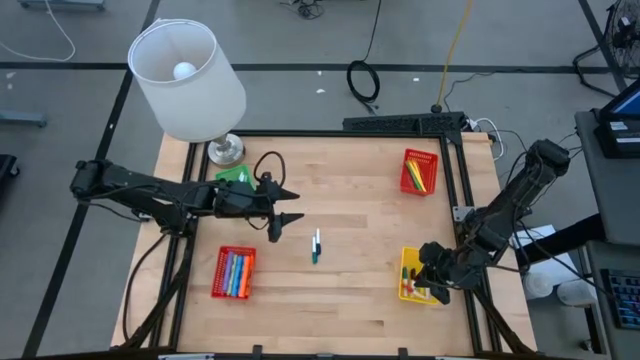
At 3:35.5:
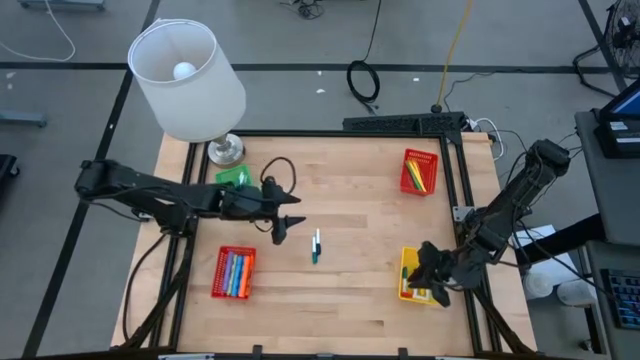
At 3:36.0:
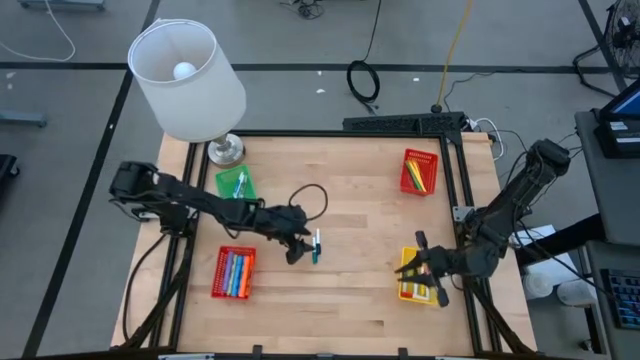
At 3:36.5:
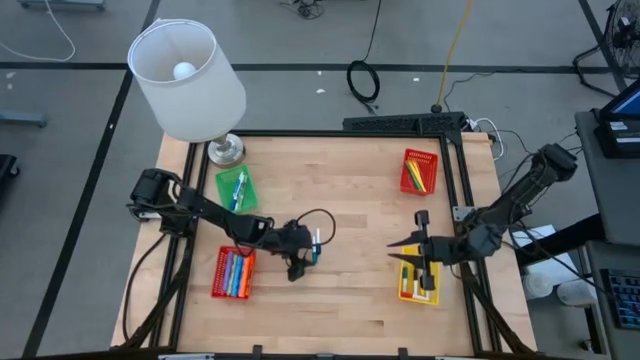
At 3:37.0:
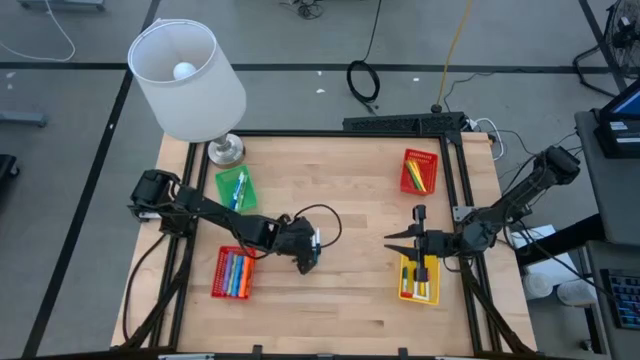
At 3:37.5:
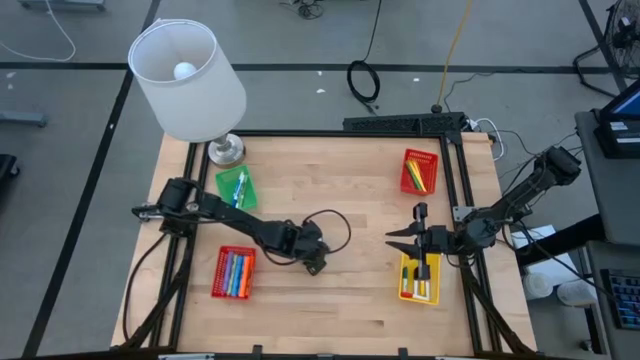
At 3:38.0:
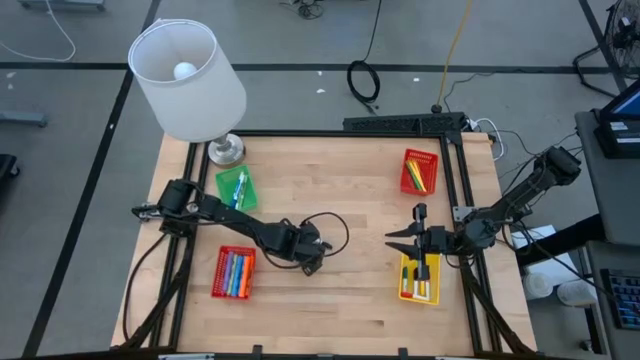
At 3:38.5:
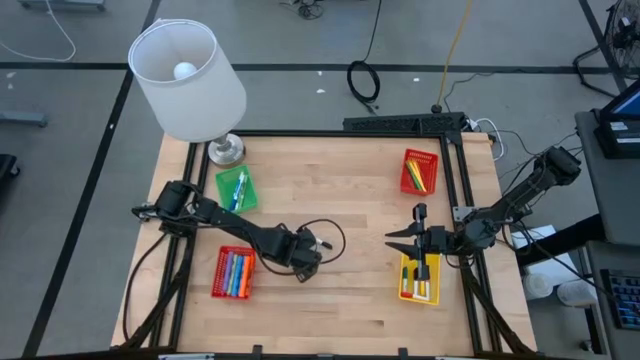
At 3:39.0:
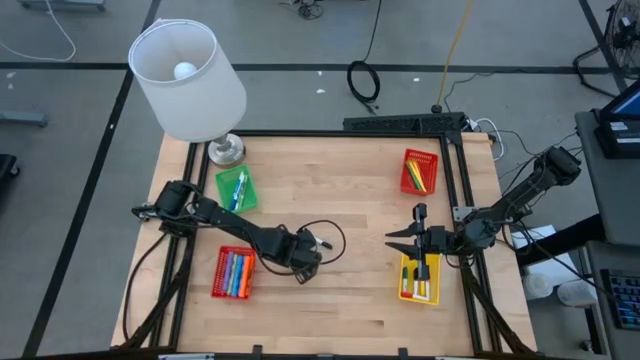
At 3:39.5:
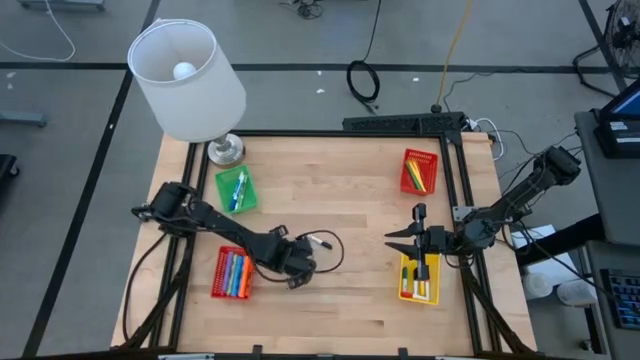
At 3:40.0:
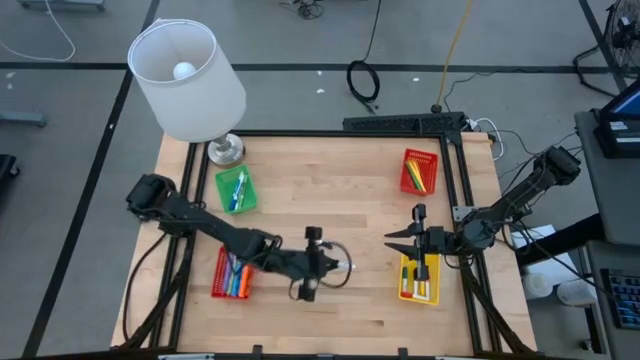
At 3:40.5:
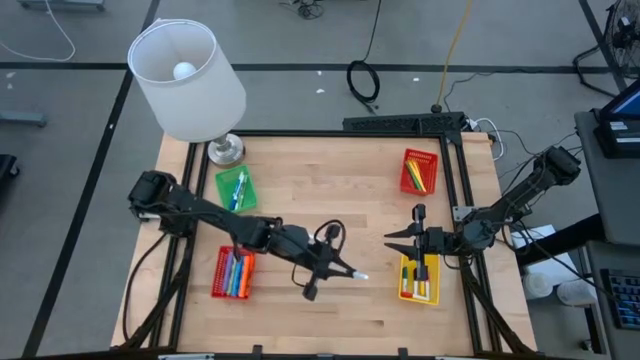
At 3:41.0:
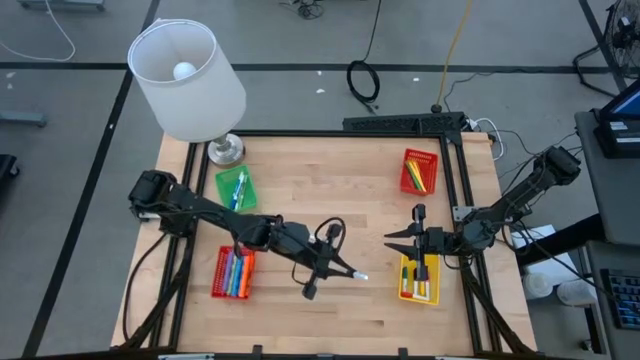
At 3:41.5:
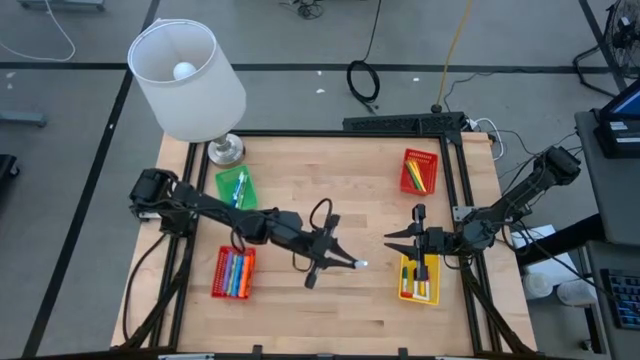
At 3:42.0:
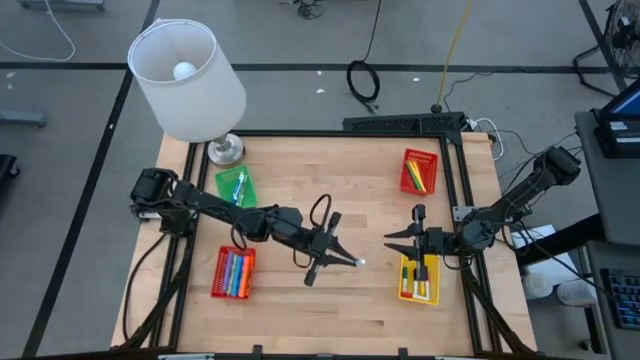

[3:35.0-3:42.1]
Task: Pick & Place Markers
Put the green highlighter pen into the yellow basket

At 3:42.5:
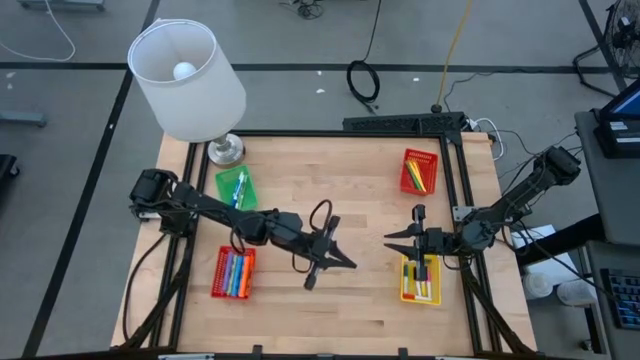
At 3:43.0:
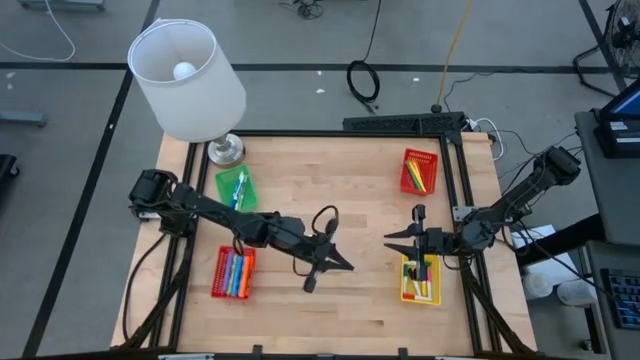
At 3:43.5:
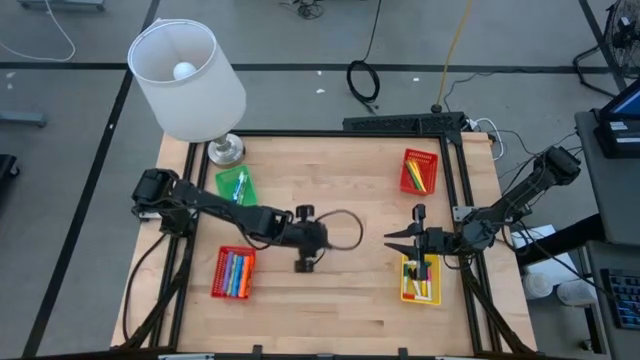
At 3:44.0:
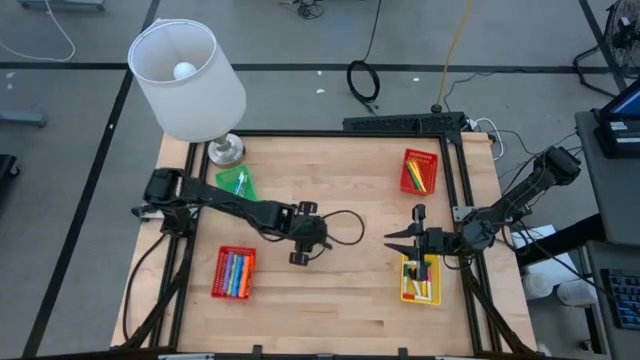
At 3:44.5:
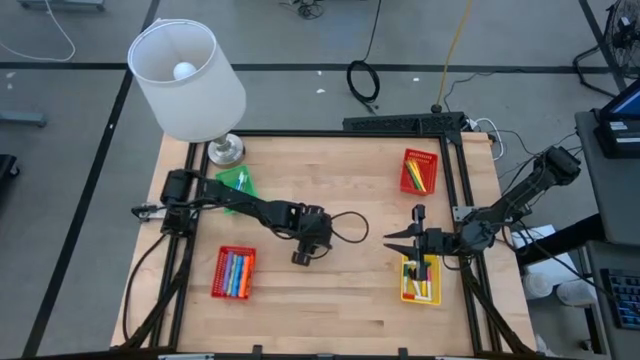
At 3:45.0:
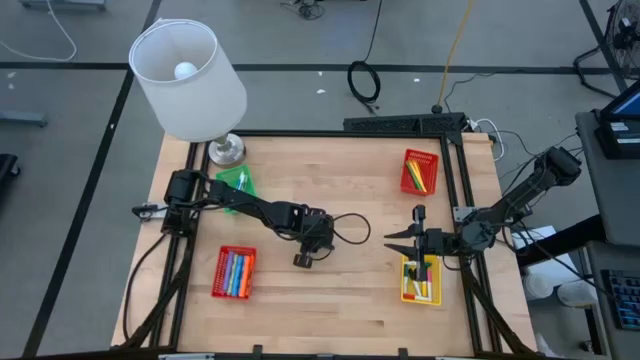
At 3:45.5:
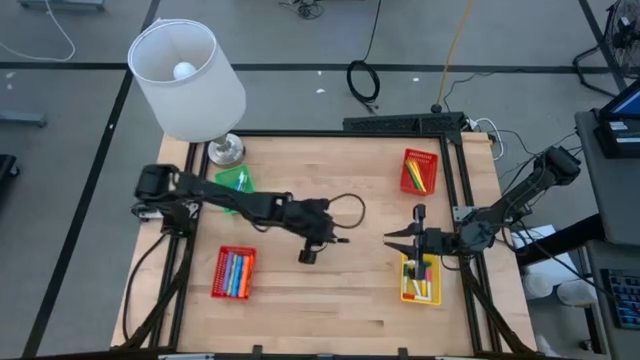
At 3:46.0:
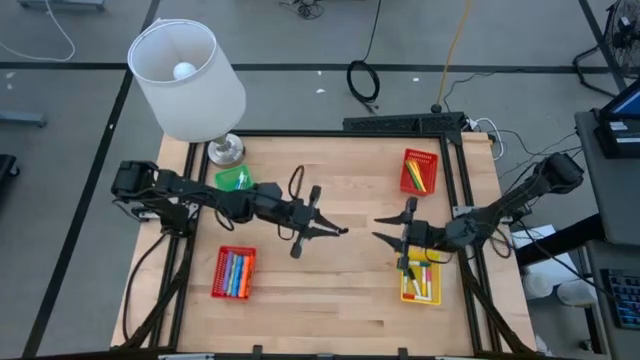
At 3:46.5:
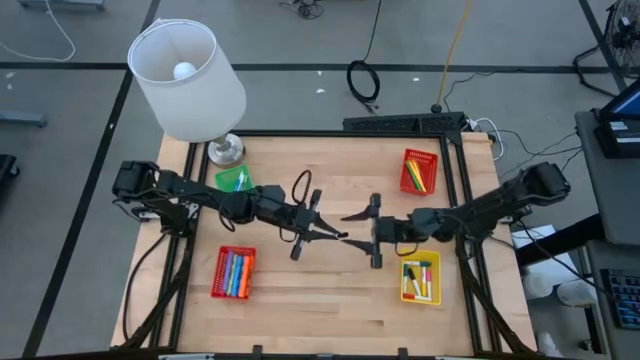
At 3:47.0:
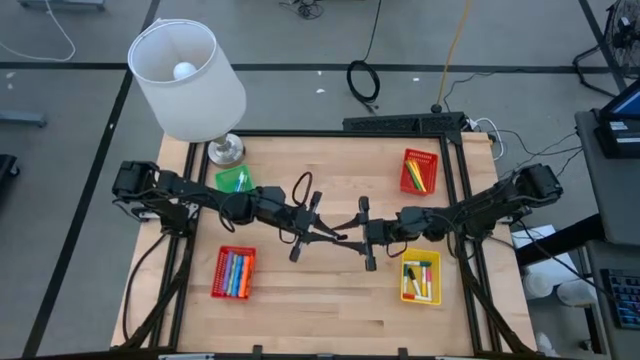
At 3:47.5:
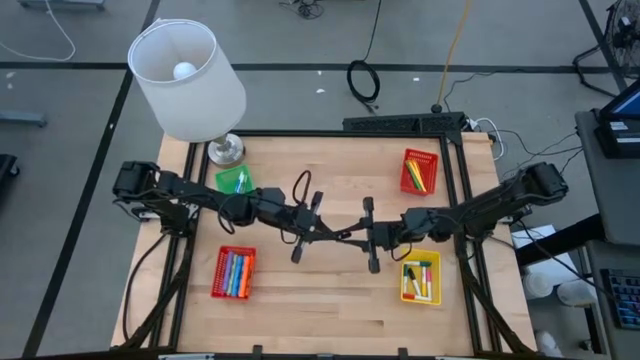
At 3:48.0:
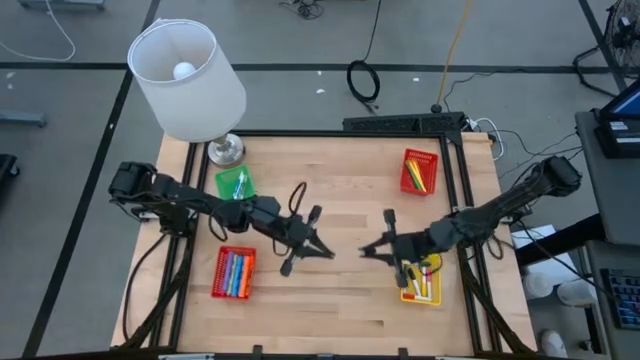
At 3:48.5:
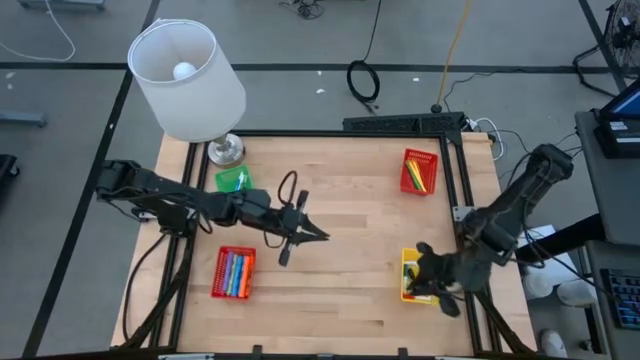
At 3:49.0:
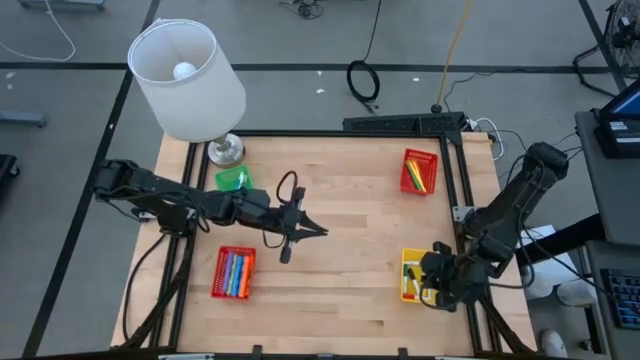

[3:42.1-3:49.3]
Put the black highlighter pen into the yellow basket

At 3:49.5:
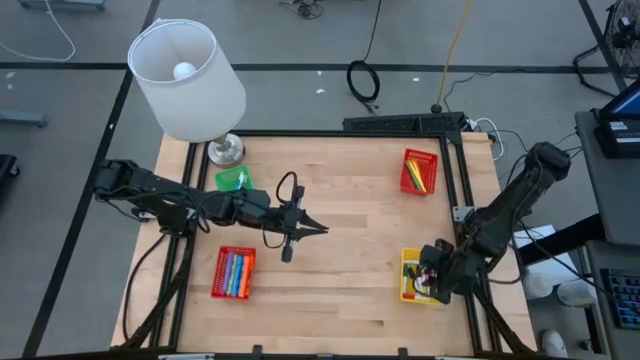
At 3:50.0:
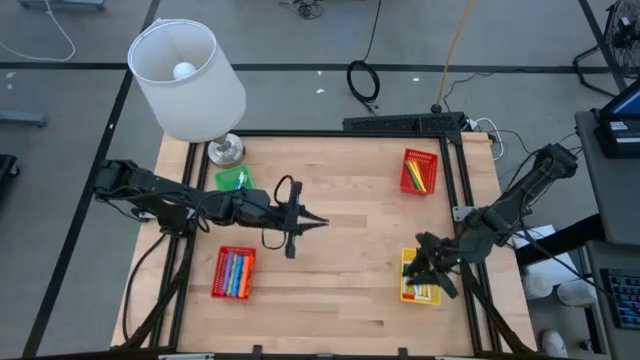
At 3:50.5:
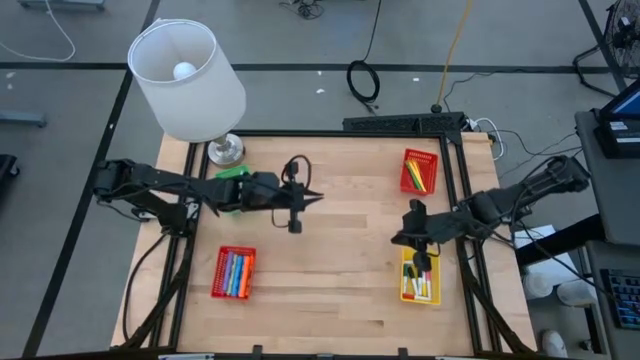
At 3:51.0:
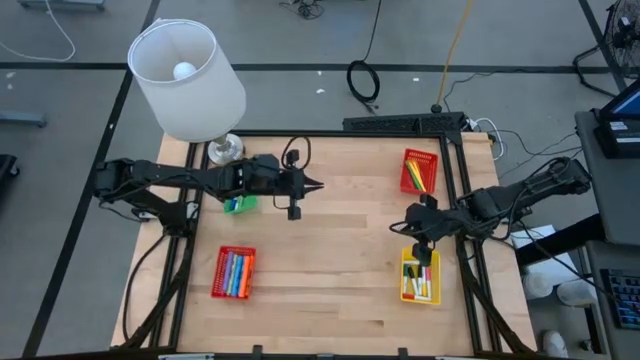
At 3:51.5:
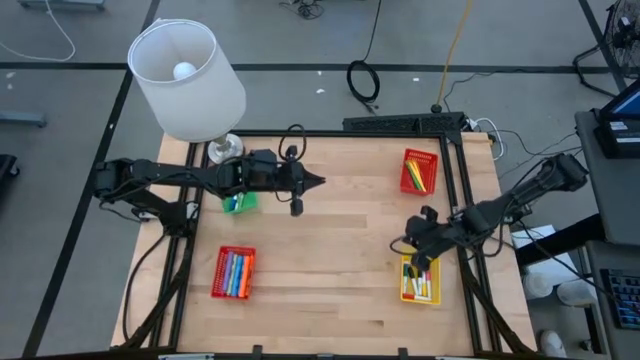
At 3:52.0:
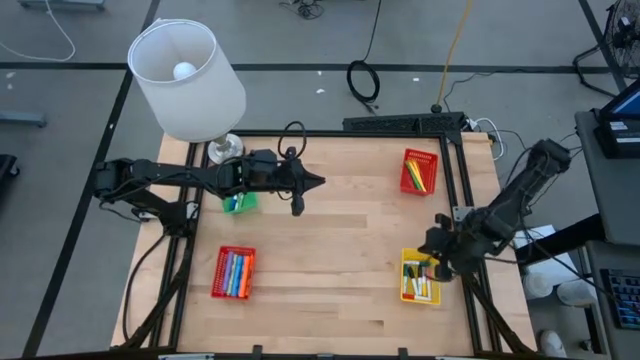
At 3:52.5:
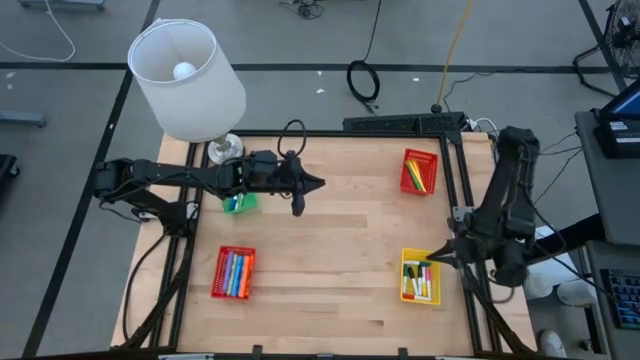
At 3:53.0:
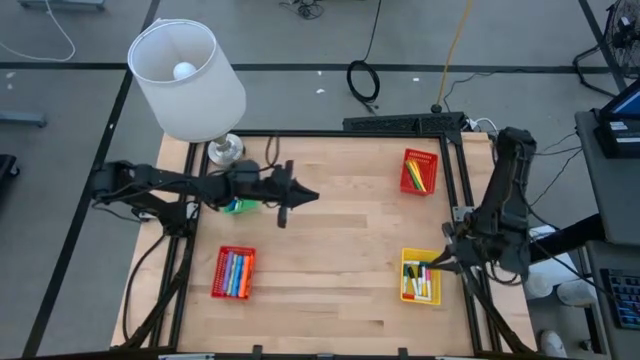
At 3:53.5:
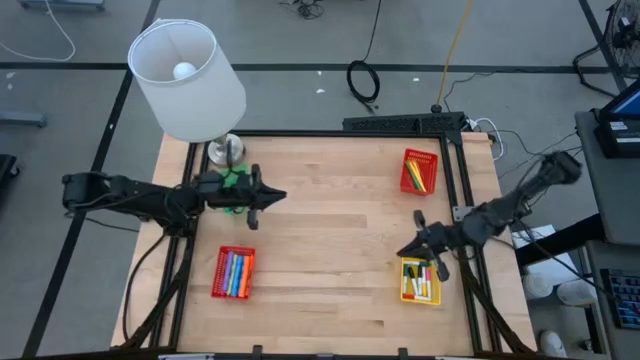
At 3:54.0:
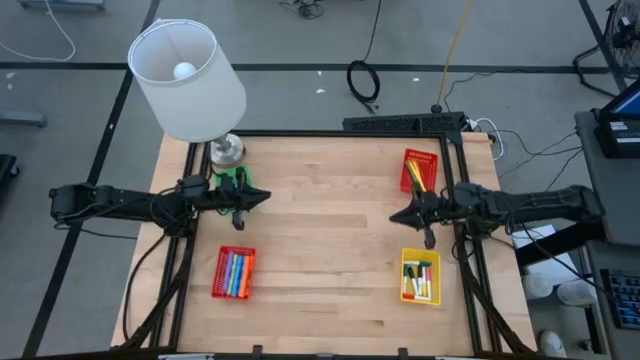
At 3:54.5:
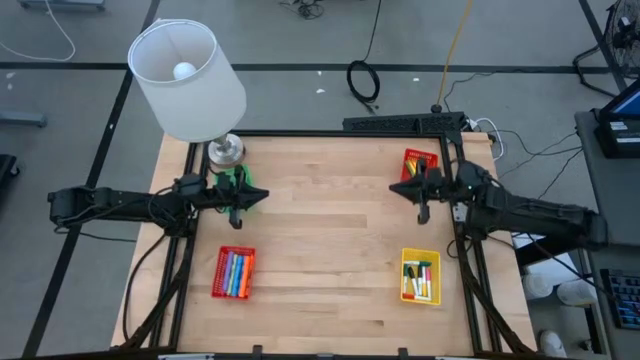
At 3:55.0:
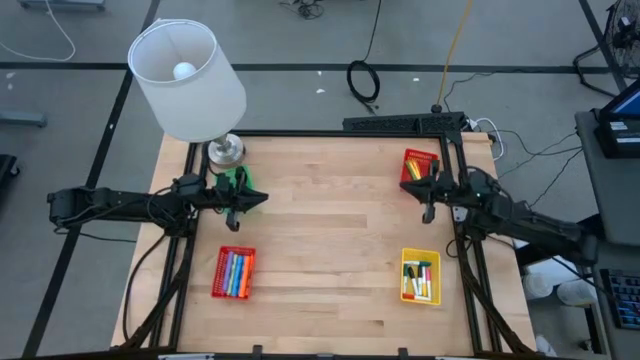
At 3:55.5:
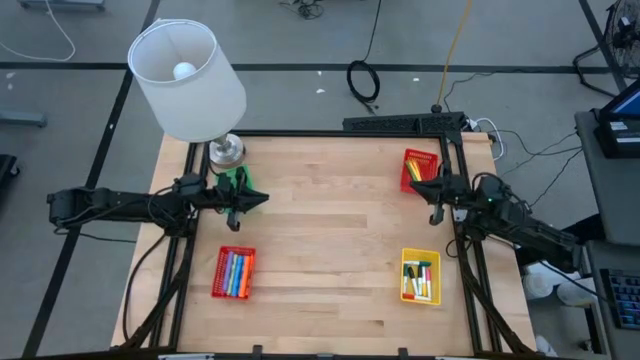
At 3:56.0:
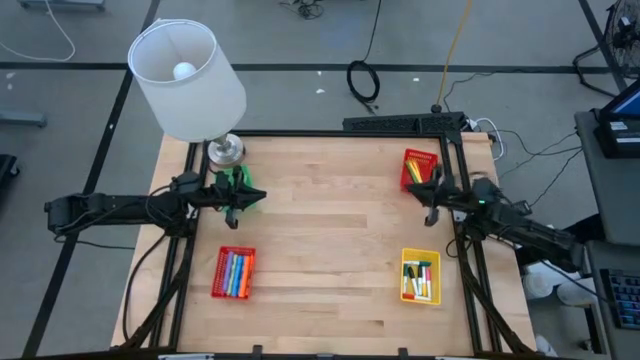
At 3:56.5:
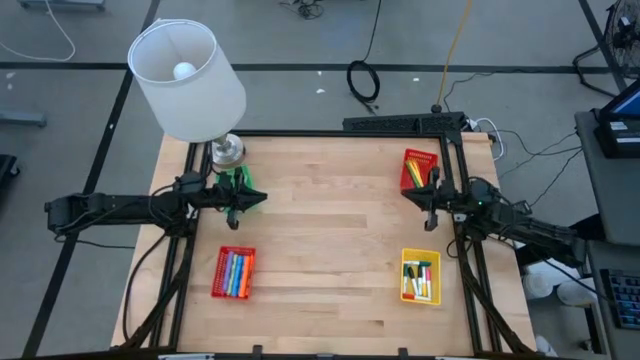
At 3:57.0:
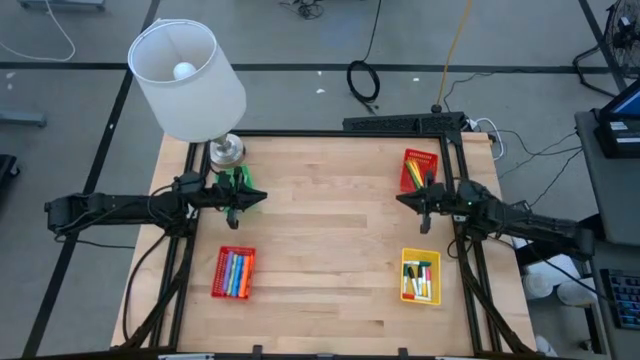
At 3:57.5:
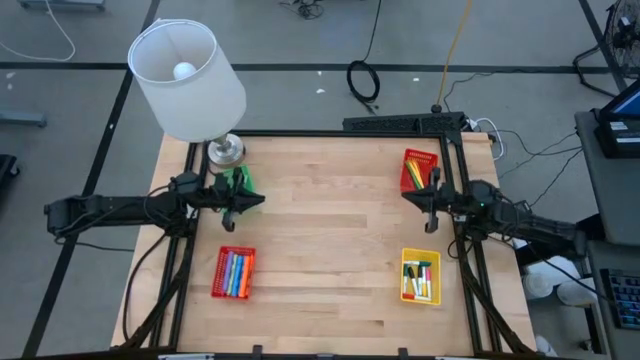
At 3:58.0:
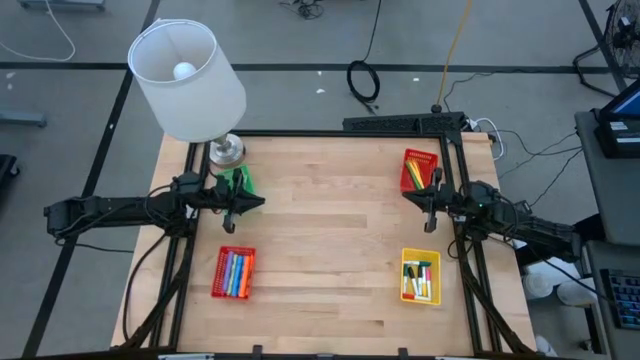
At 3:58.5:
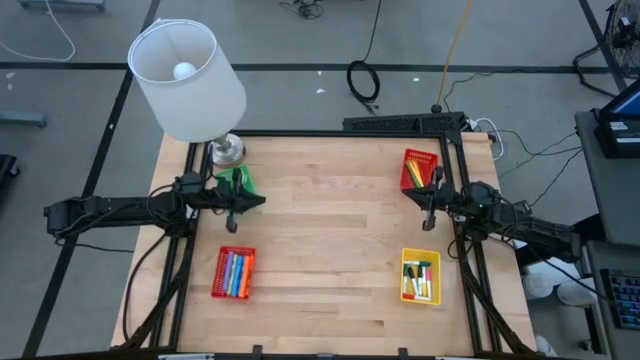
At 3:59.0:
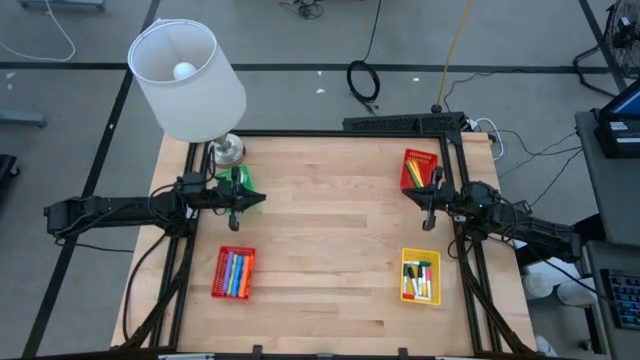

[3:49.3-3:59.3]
Return to Home Position
